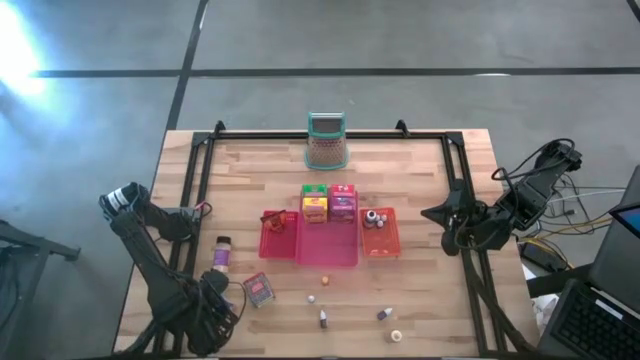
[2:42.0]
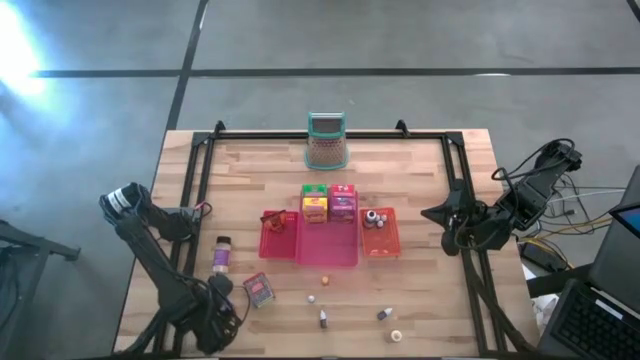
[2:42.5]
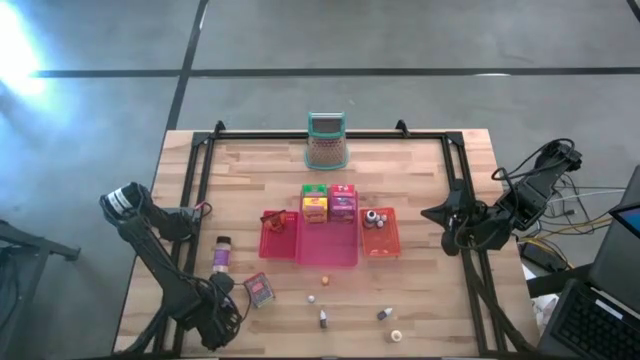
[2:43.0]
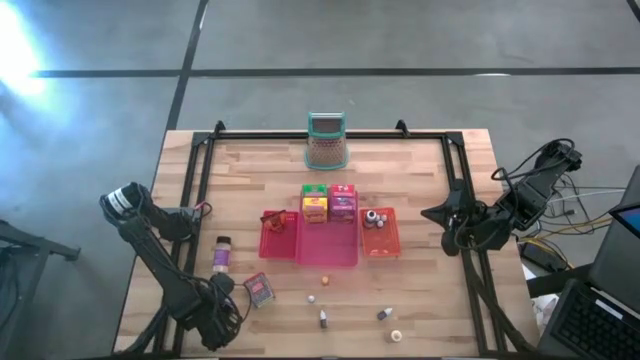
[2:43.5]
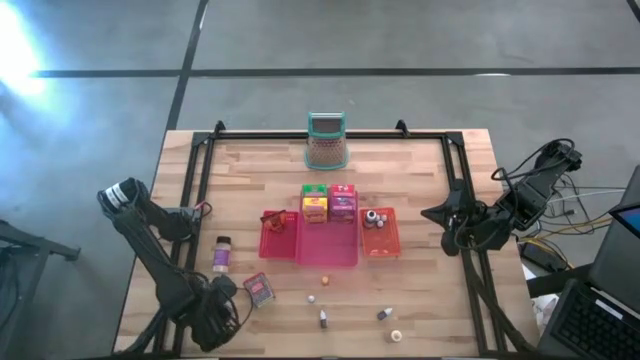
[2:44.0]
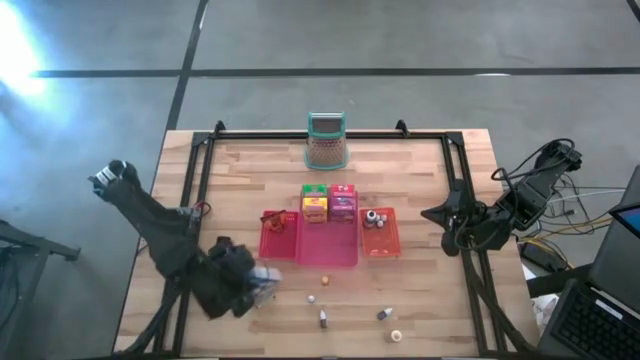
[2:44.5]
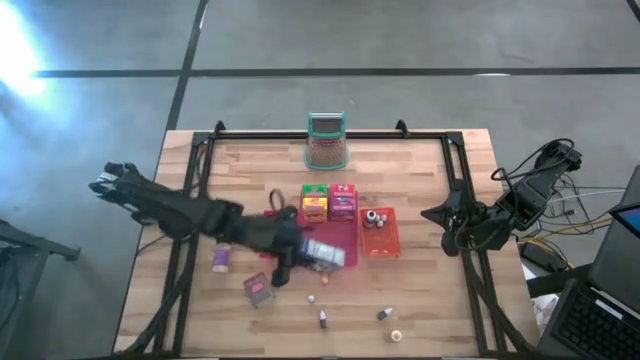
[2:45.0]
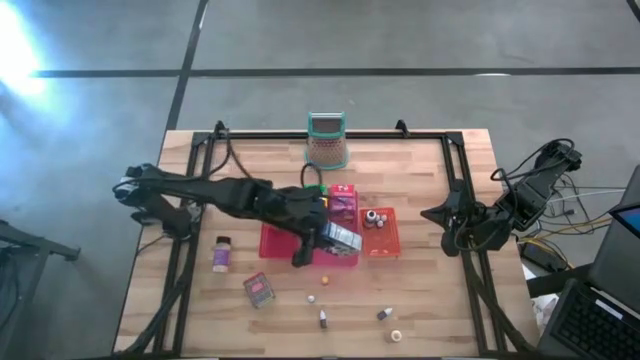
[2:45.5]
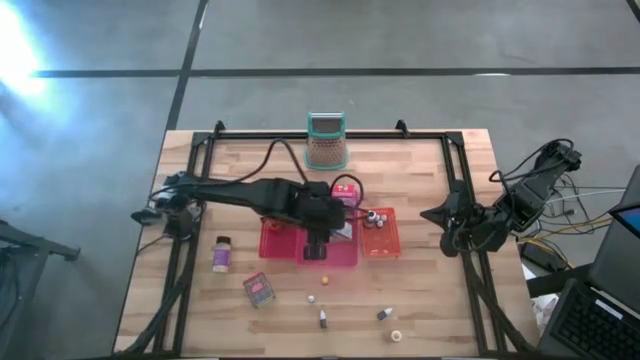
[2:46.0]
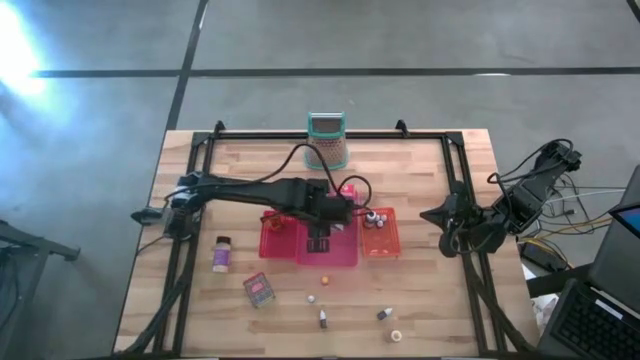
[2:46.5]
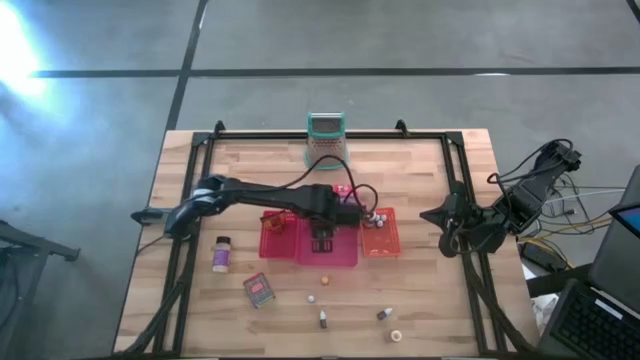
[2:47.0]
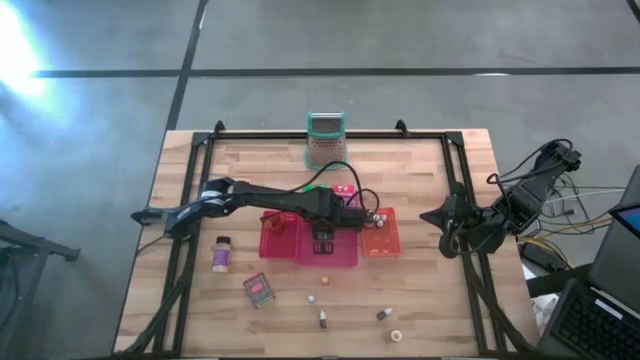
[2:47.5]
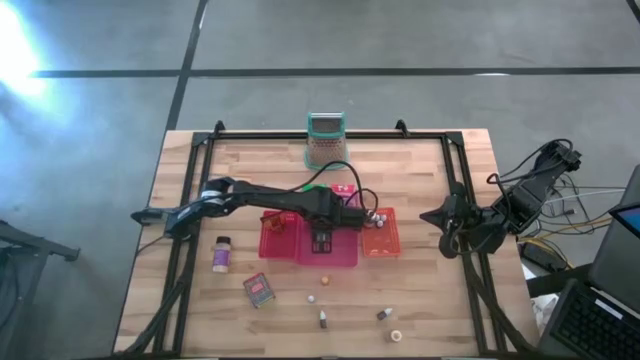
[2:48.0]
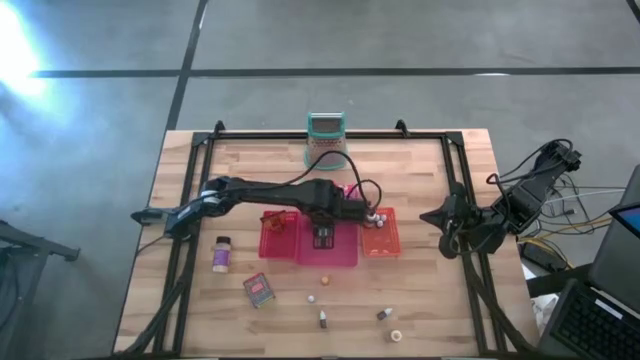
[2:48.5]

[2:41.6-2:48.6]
Task: Pick & Place Kitchen Items
Put the blue cereal box into the pink bin

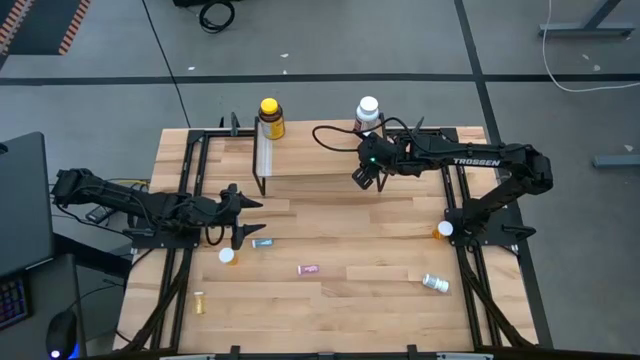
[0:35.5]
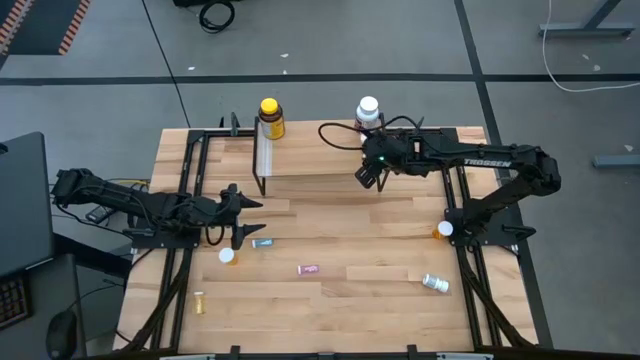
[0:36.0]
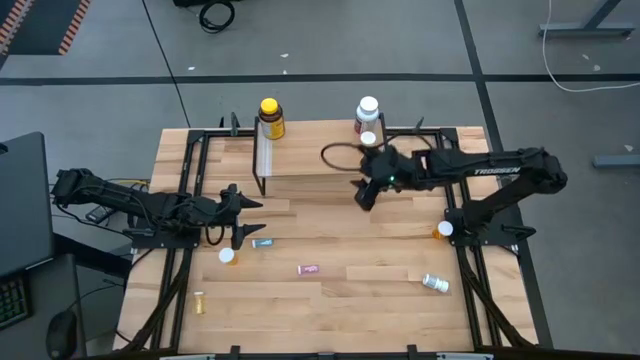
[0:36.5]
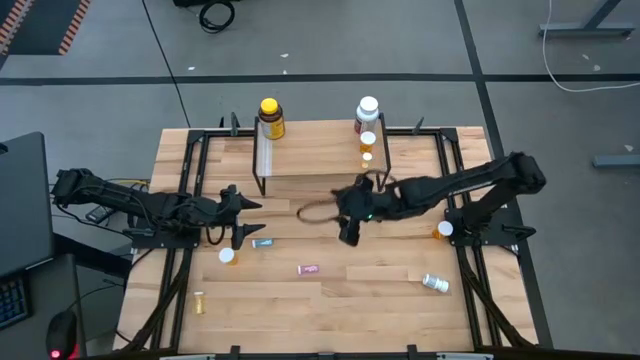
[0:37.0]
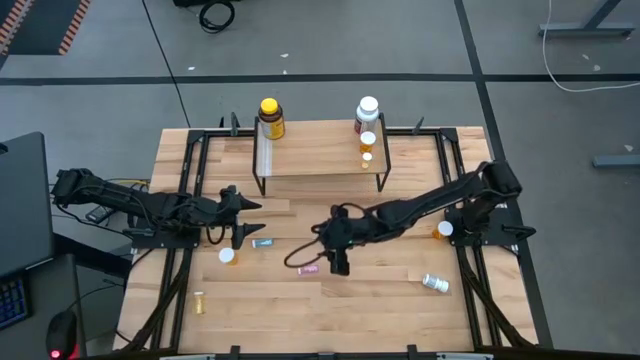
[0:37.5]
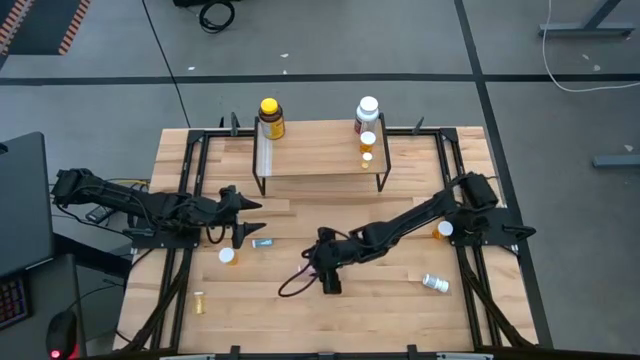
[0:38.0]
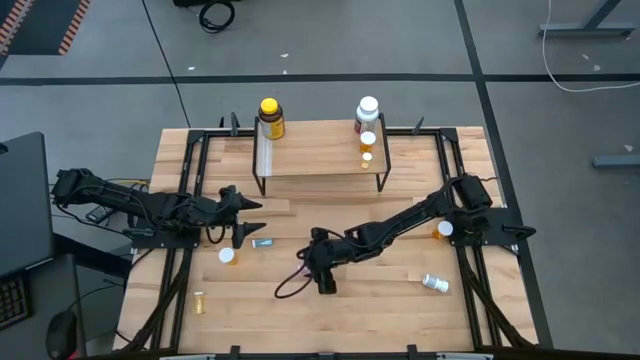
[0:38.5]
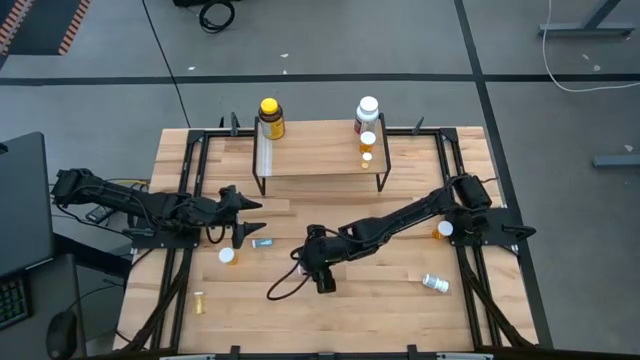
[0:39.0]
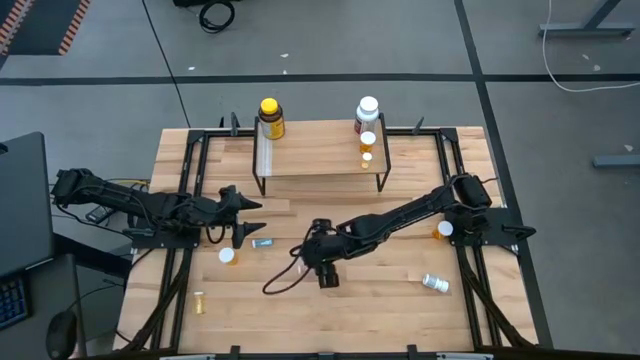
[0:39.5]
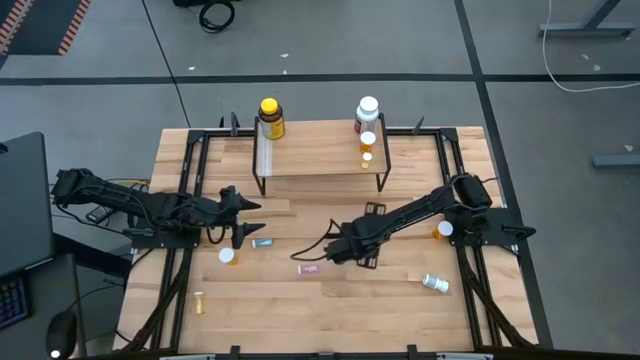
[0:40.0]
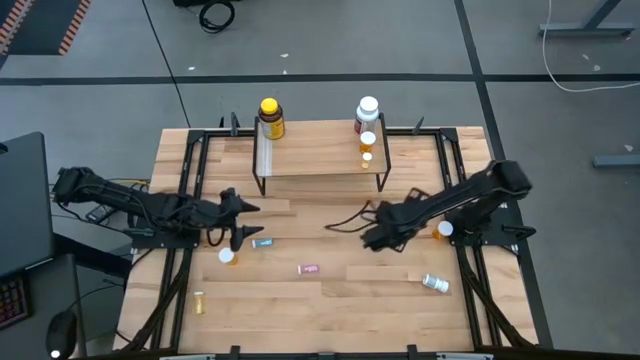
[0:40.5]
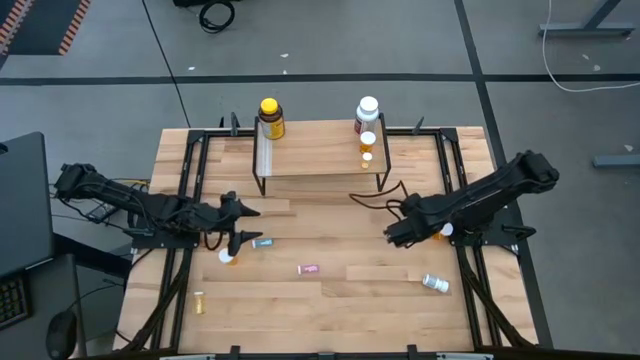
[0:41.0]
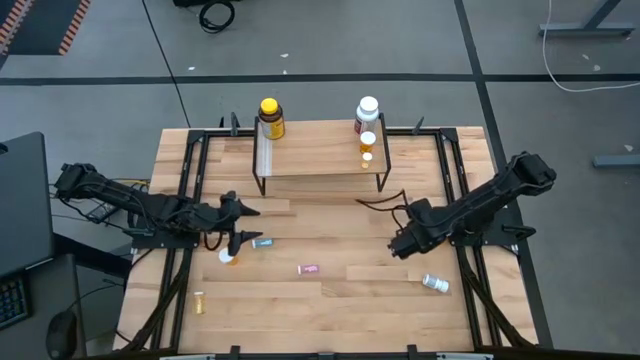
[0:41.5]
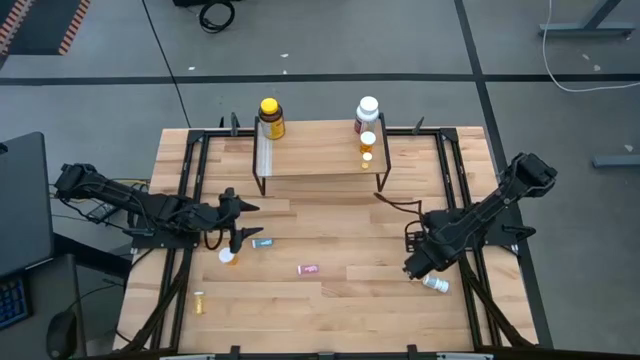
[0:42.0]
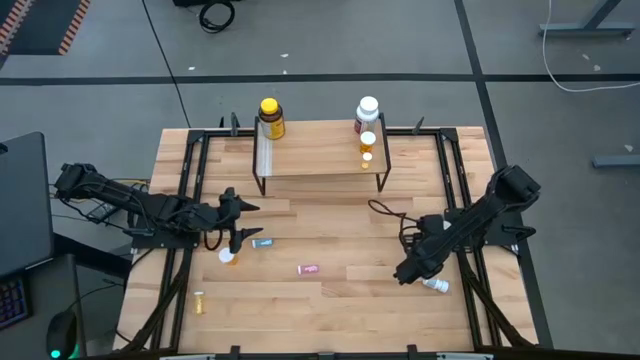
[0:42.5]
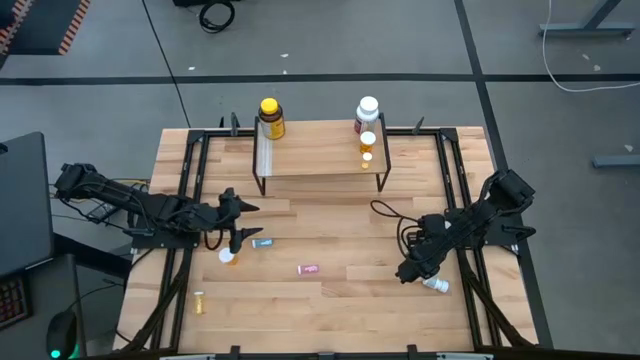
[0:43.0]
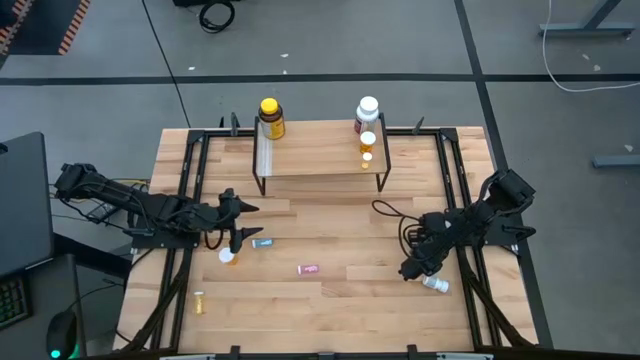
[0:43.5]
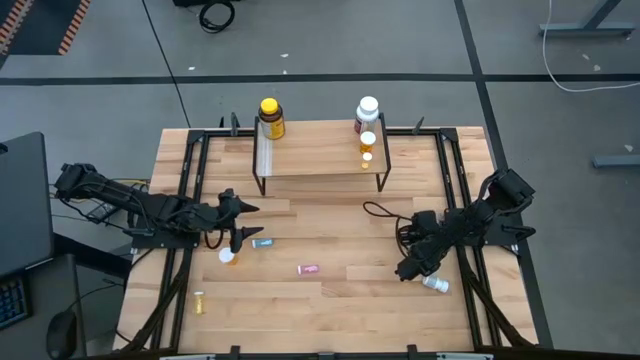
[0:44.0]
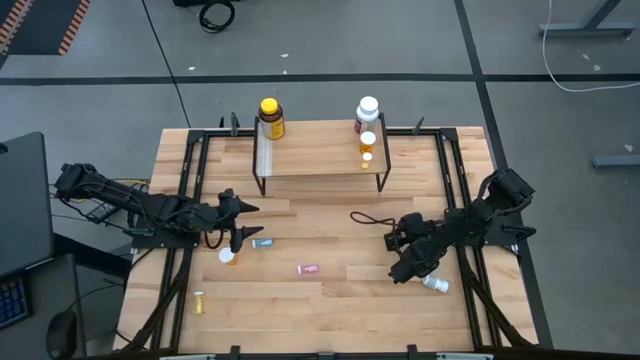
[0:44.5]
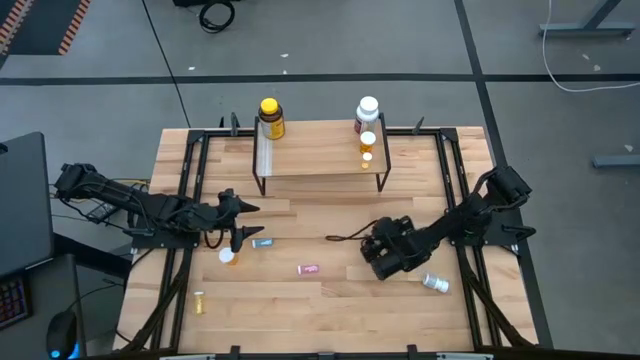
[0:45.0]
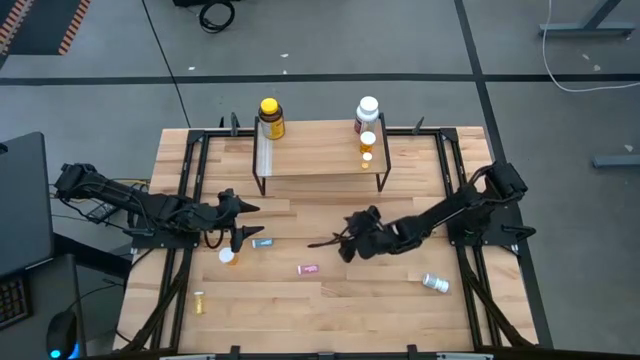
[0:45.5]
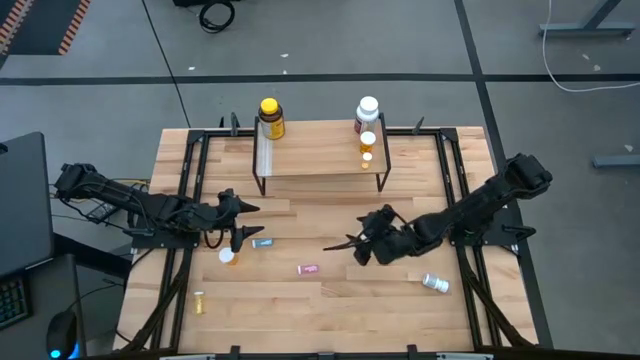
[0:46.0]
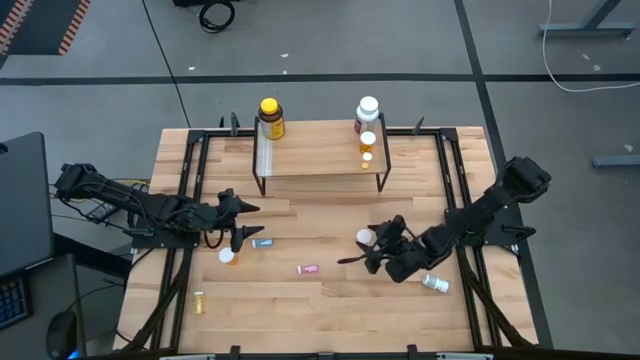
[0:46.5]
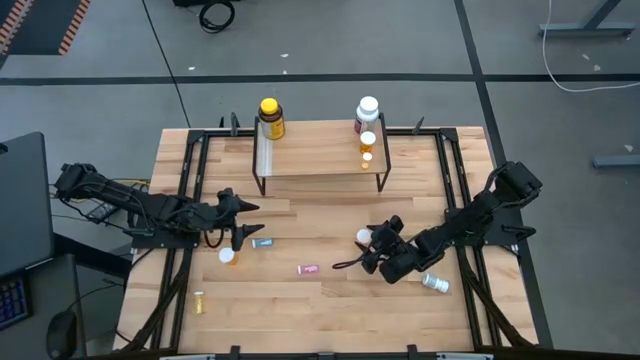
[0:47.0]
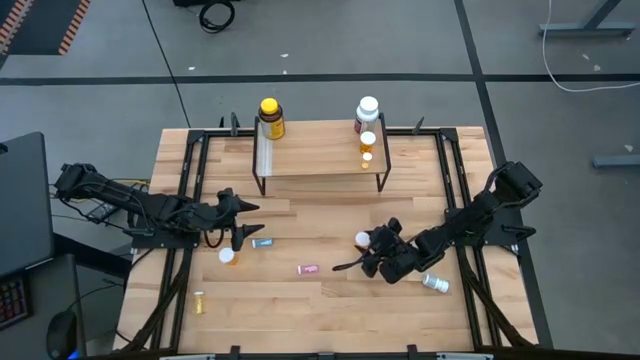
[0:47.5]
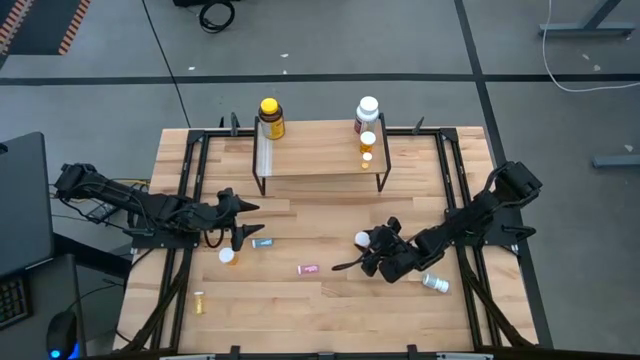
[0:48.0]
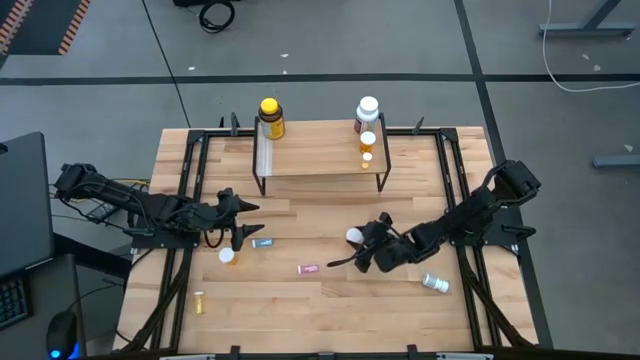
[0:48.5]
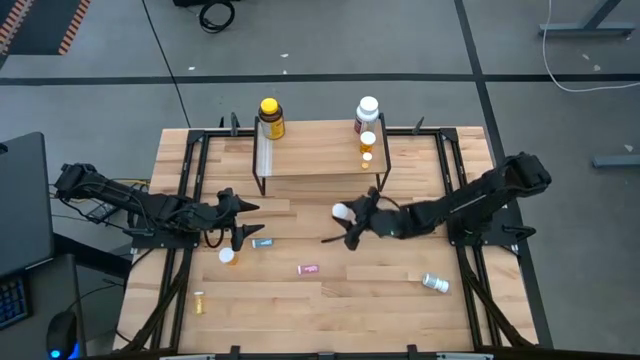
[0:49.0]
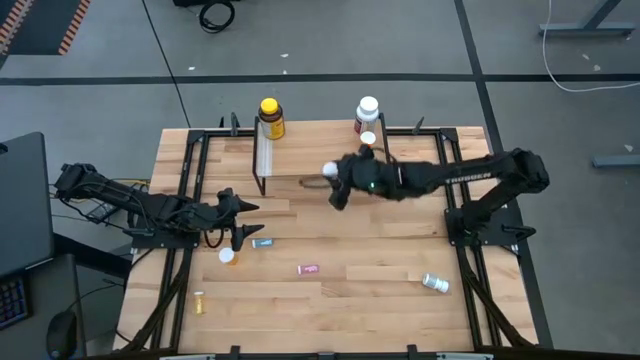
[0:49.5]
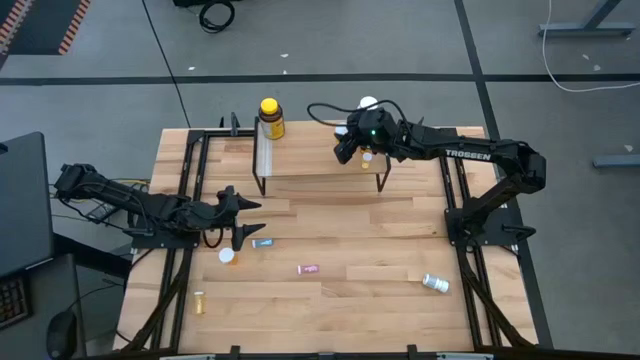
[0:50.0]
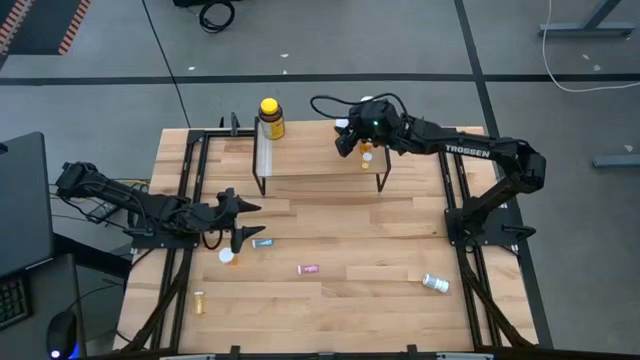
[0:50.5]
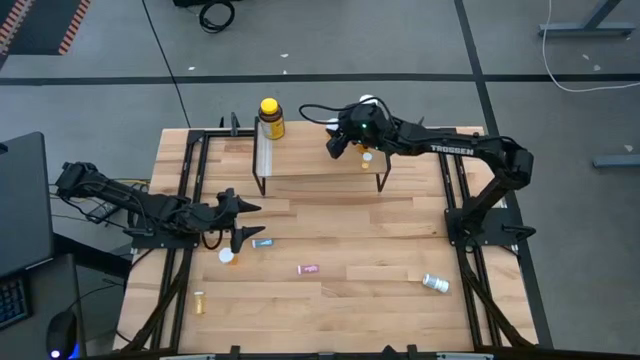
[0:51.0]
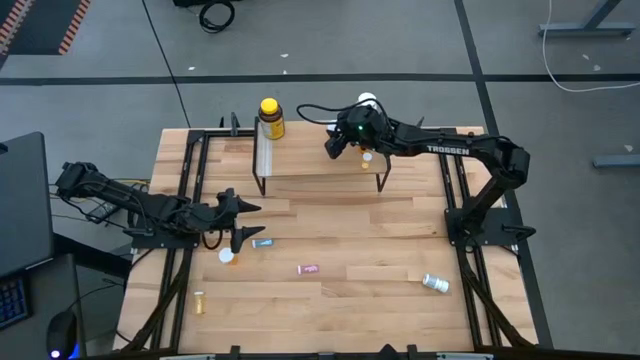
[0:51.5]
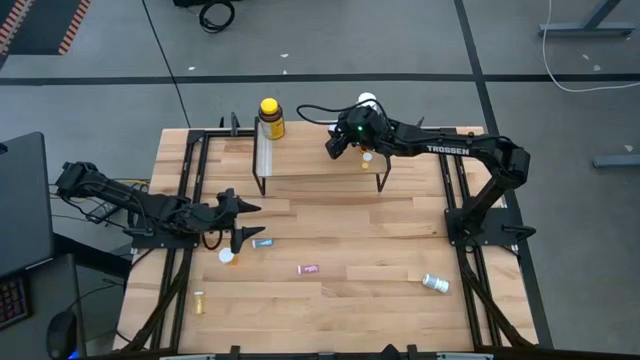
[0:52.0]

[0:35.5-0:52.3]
Task: Pick and place medicine bottles onto shelf by color
Put the right large orange pill bottle on the shelf
